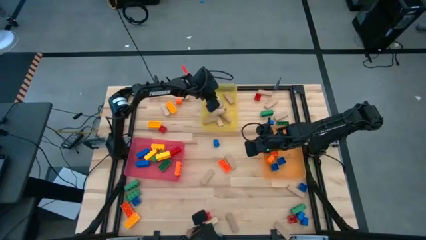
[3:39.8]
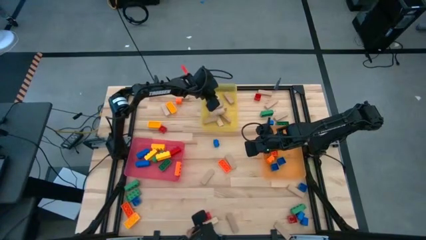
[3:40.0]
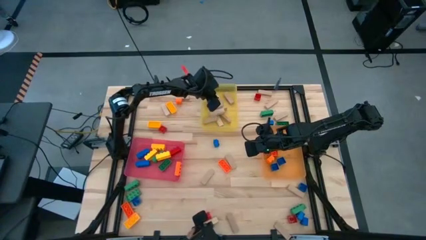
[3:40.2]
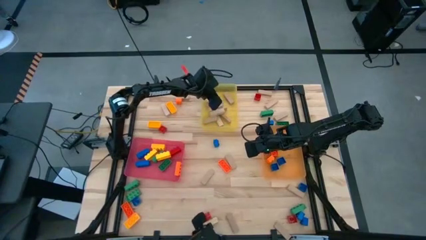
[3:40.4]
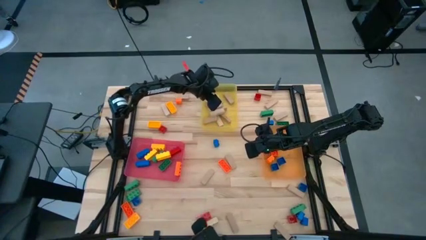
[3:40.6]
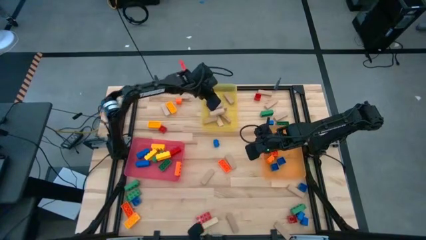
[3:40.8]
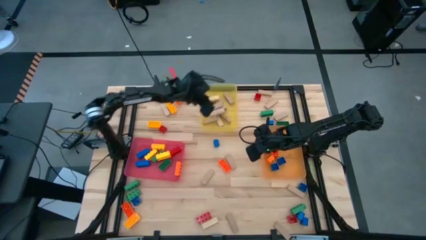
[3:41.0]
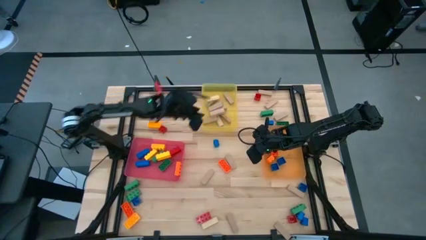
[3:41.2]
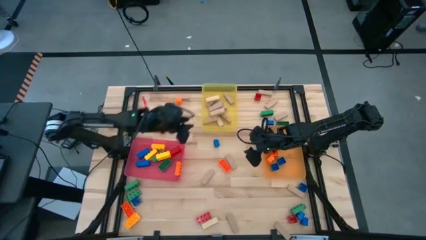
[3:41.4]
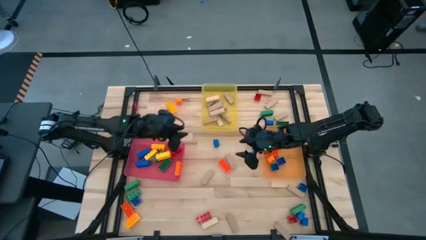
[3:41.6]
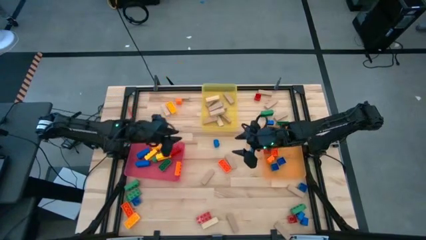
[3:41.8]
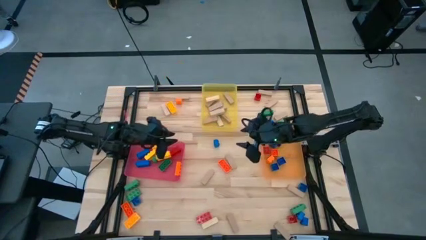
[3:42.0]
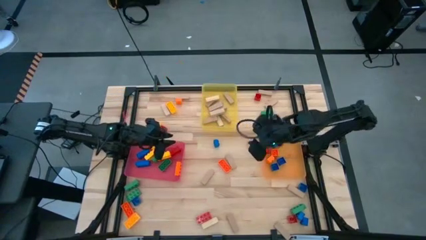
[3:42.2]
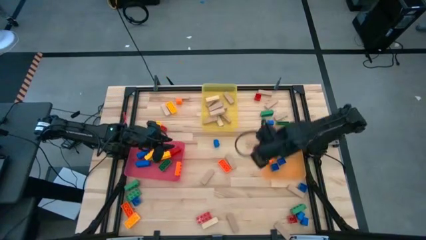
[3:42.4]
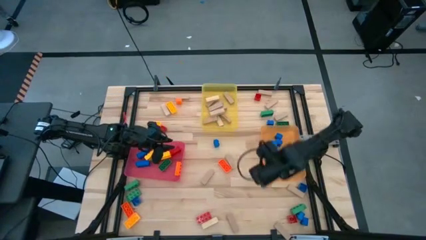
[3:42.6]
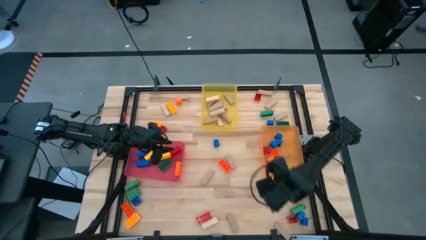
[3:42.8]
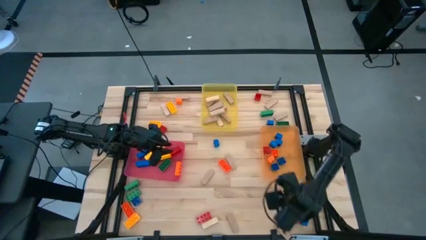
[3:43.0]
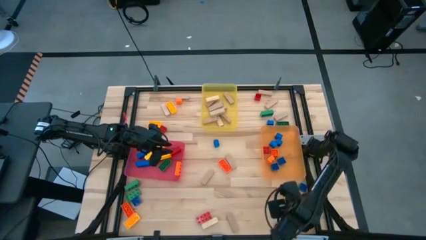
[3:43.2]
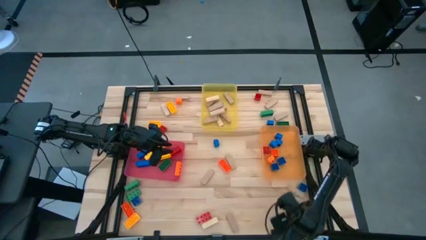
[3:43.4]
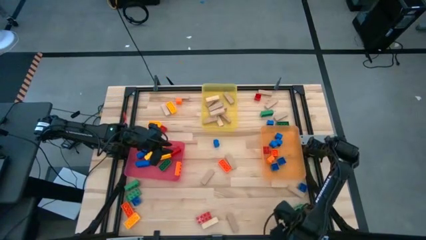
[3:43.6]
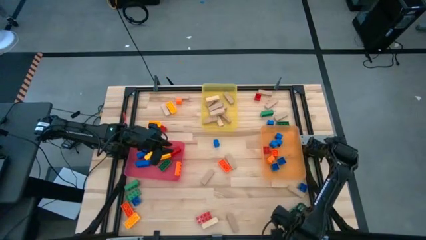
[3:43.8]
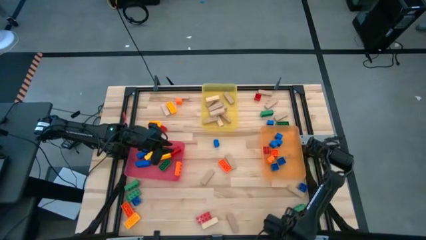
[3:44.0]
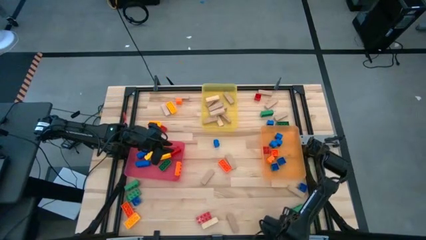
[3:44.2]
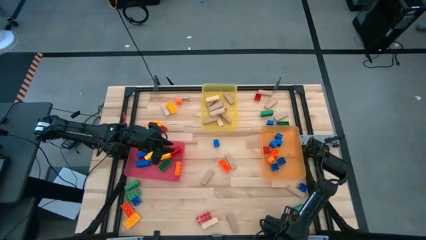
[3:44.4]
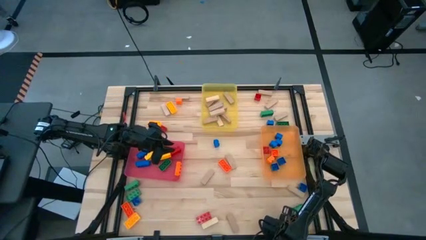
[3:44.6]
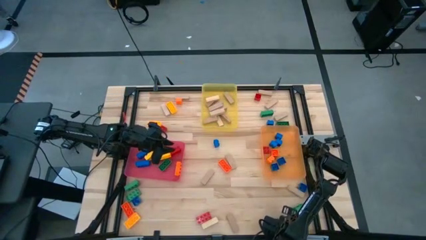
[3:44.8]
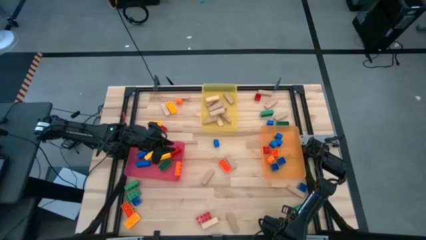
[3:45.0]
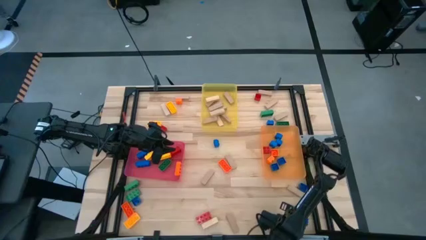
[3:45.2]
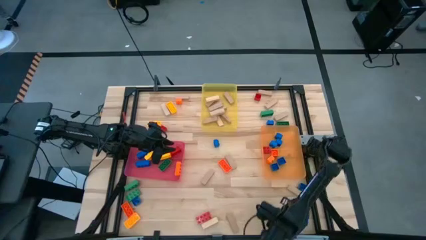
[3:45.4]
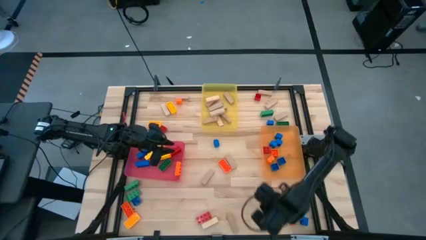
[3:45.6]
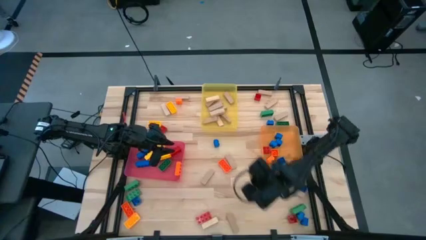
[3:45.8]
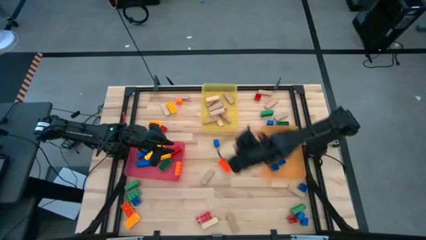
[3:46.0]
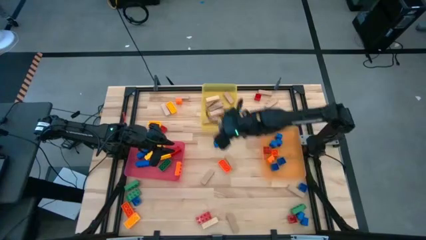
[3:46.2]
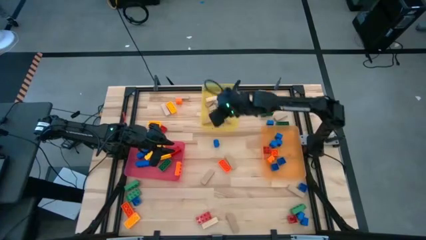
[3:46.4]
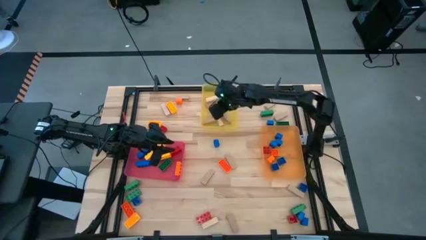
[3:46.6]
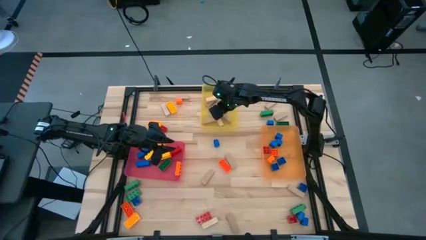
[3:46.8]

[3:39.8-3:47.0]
Task: Sort blocks by size
Put the wooden block into the yellow bin

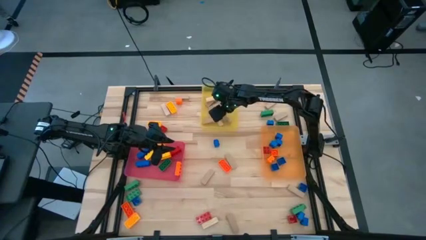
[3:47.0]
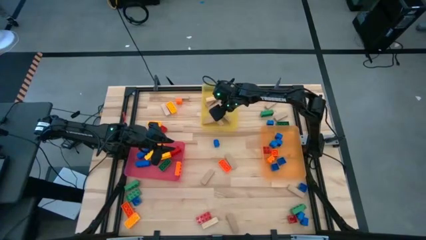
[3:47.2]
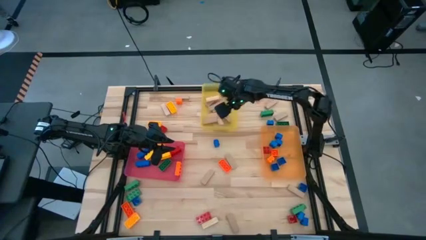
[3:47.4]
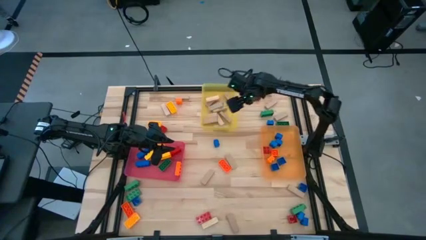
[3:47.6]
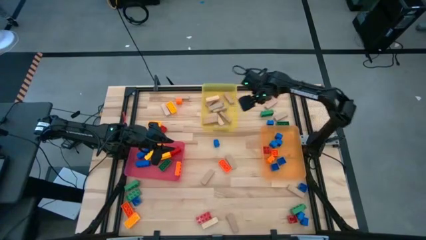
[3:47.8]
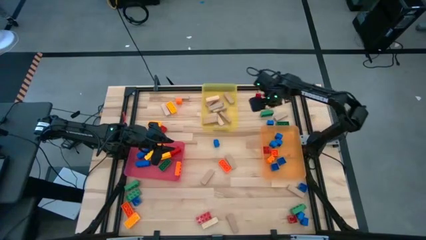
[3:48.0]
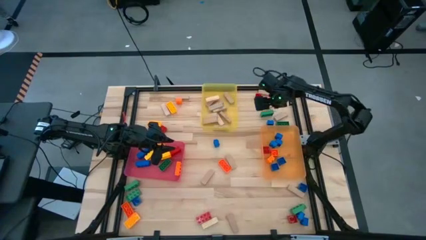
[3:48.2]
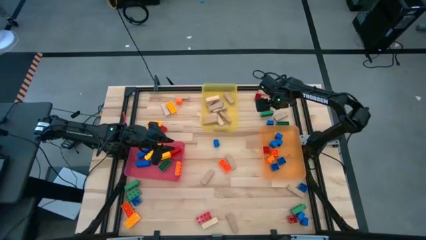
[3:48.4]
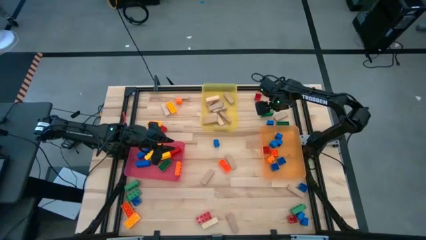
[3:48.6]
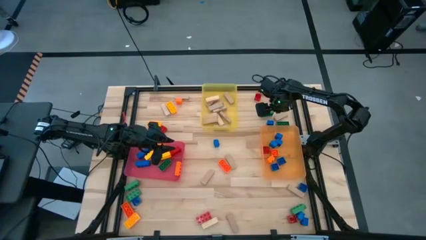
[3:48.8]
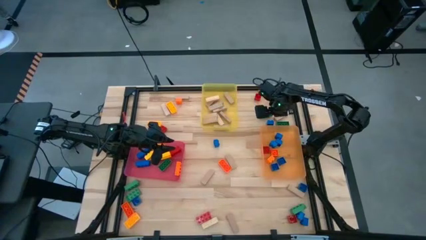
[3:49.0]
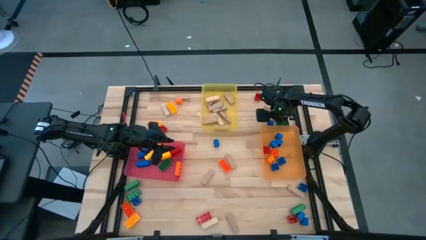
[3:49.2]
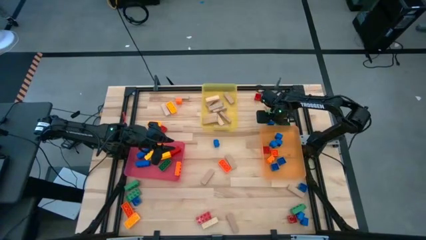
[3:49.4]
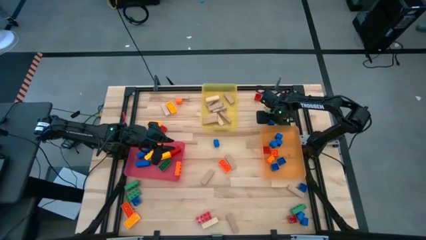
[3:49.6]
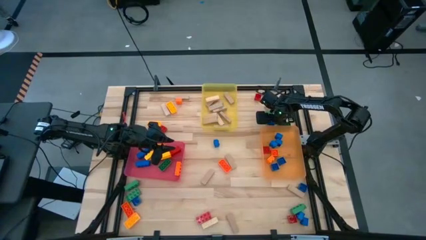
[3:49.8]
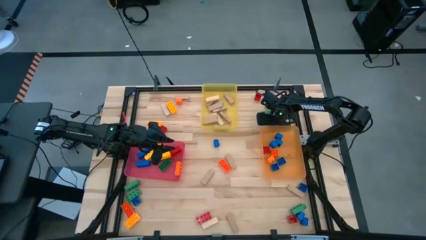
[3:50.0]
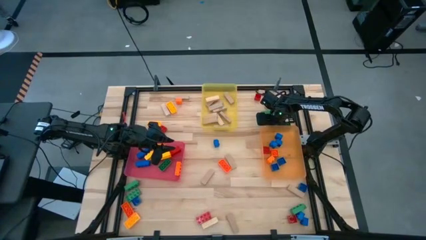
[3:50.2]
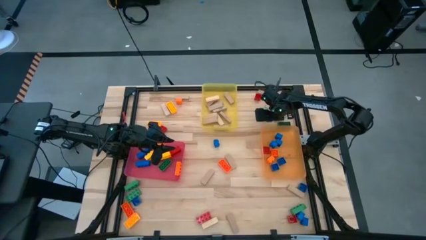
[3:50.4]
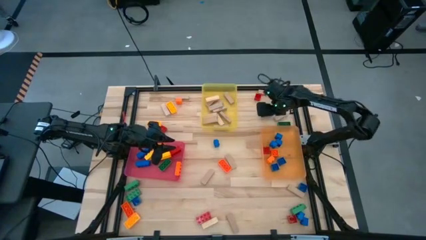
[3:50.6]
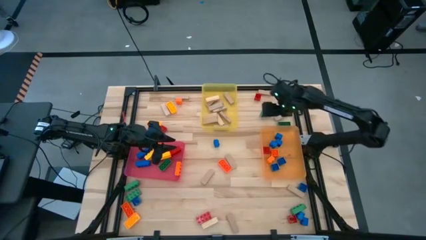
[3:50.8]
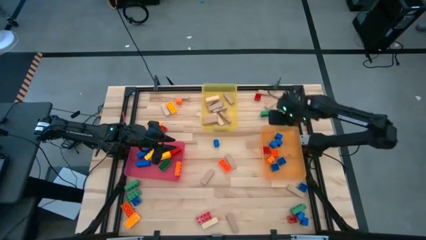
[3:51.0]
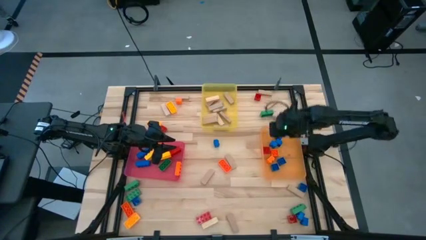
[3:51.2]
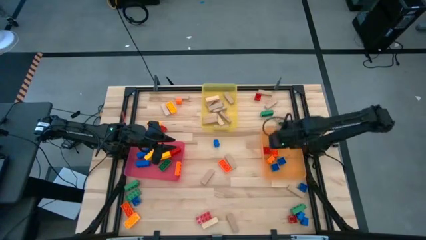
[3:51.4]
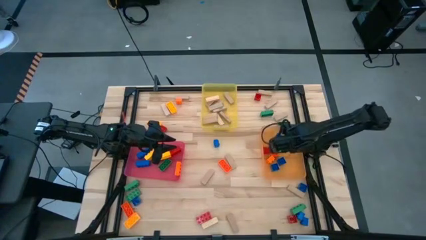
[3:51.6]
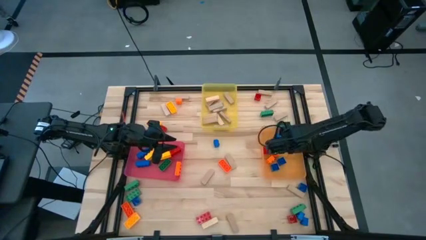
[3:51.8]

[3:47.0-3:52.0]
Put the 1 stud blue game piece into the orange bin

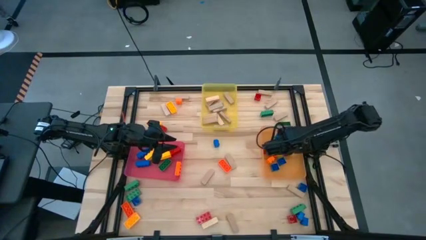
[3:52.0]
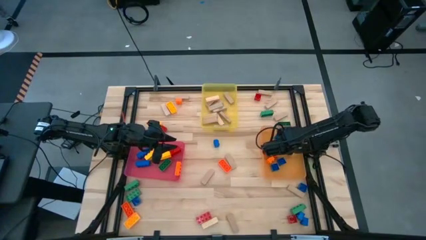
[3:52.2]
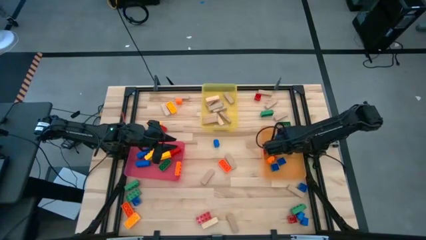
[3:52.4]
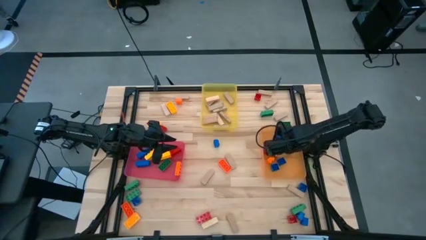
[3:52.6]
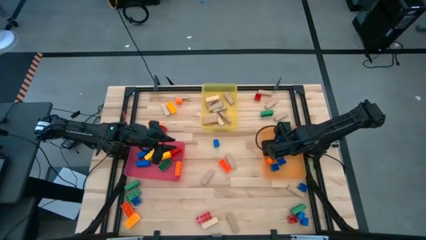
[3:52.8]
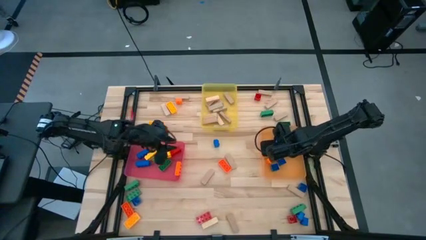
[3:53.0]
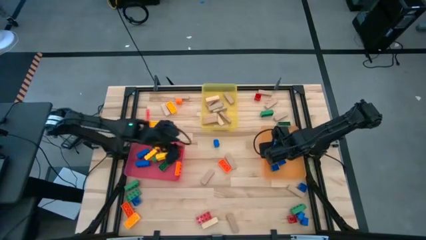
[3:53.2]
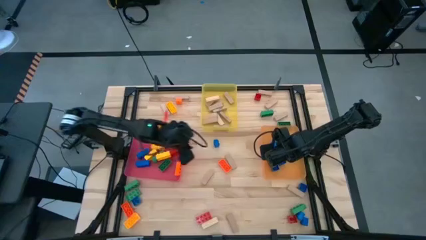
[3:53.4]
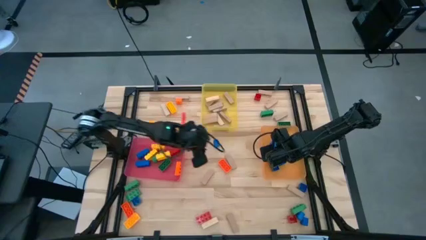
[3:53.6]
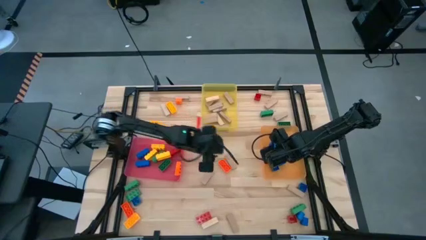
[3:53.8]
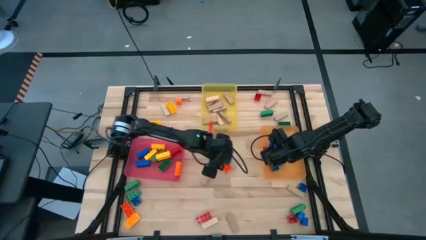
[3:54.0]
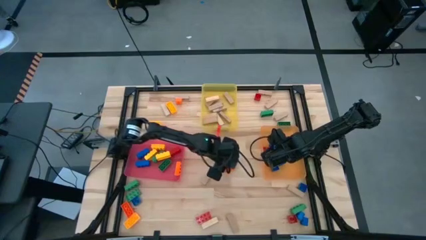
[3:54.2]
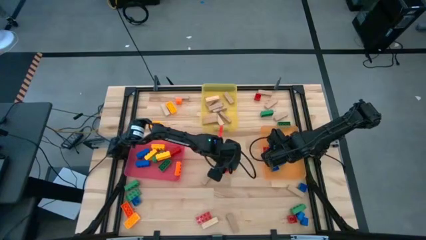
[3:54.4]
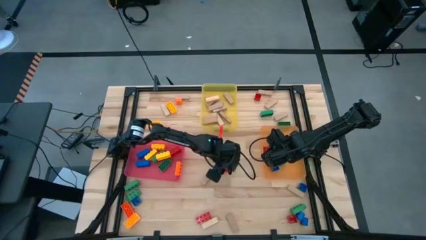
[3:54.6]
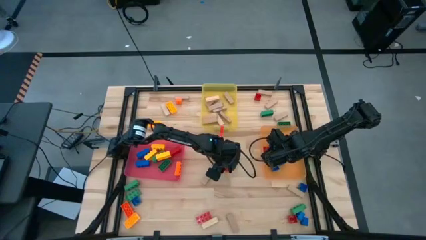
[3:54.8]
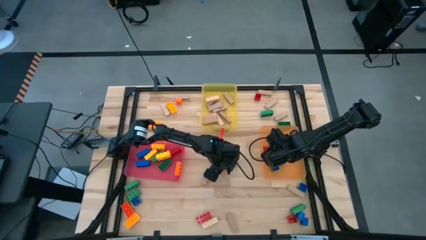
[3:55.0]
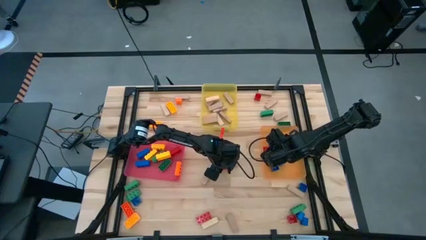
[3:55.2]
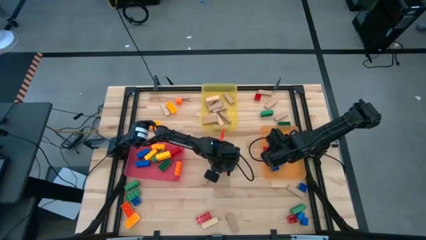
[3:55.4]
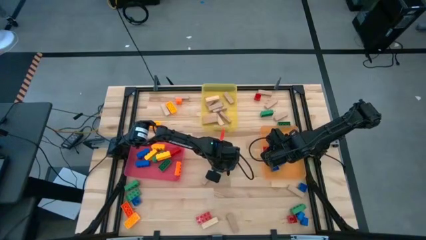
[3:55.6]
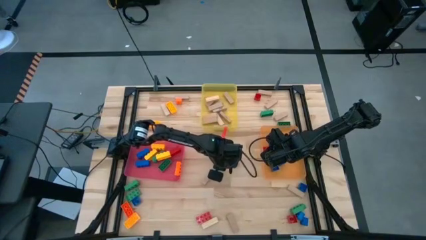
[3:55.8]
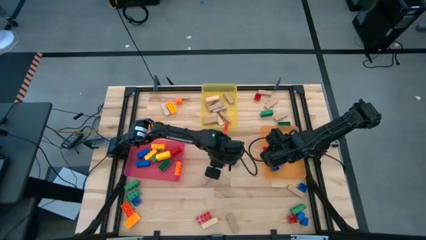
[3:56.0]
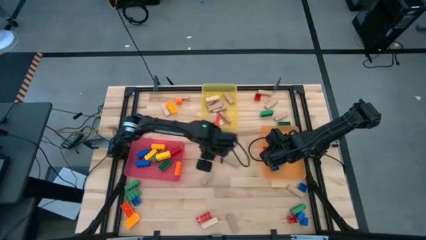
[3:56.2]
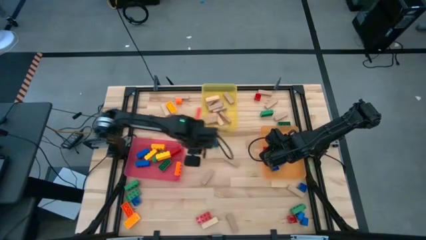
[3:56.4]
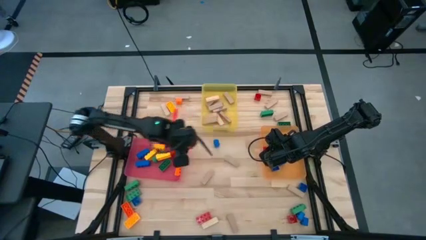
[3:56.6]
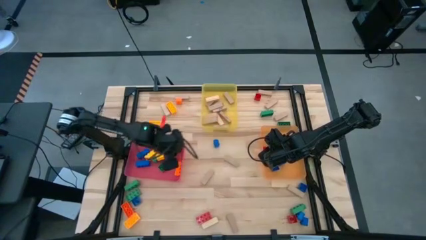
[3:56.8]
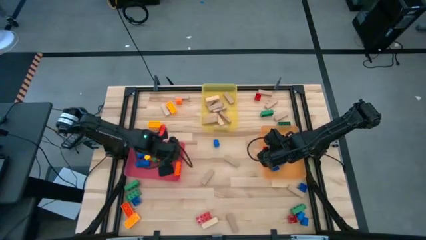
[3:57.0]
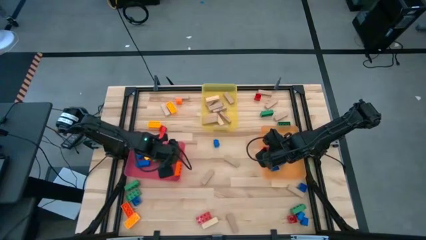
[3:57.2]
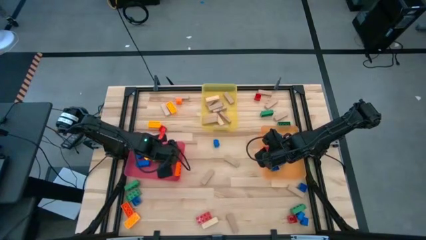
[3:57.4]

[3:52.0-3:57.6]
Put the 3 stud orange game piece into the pink bin
